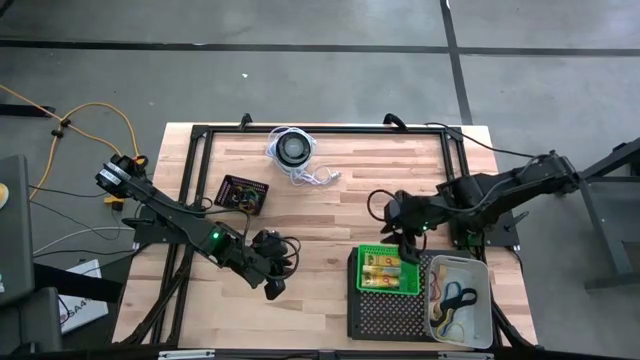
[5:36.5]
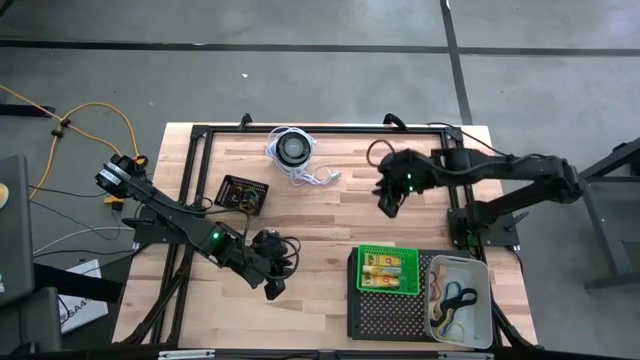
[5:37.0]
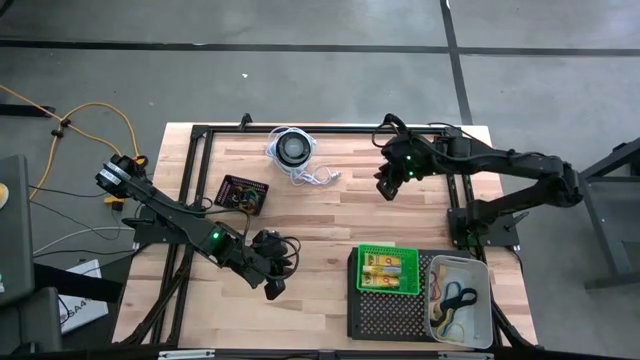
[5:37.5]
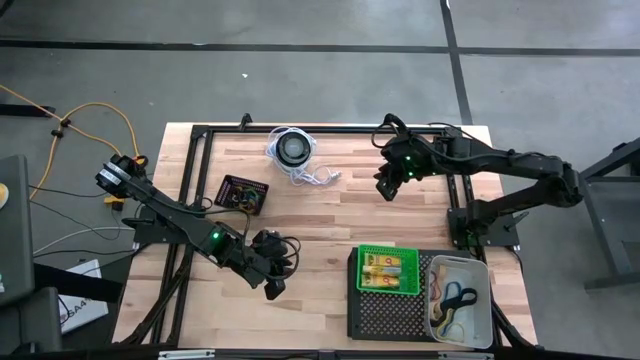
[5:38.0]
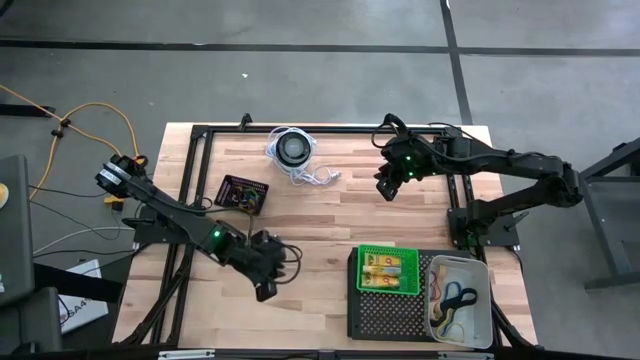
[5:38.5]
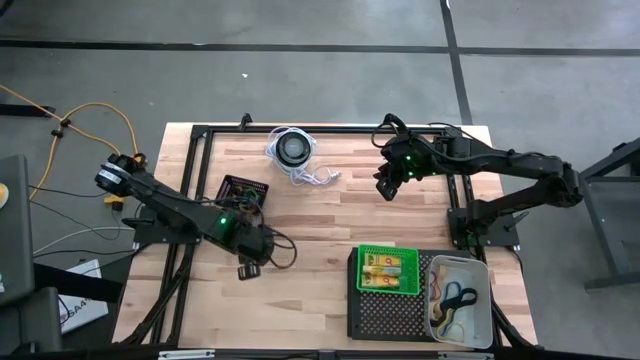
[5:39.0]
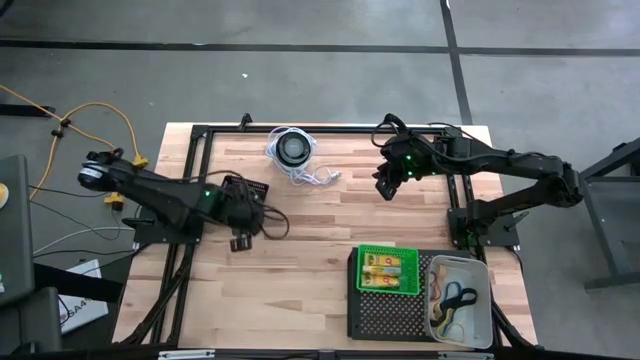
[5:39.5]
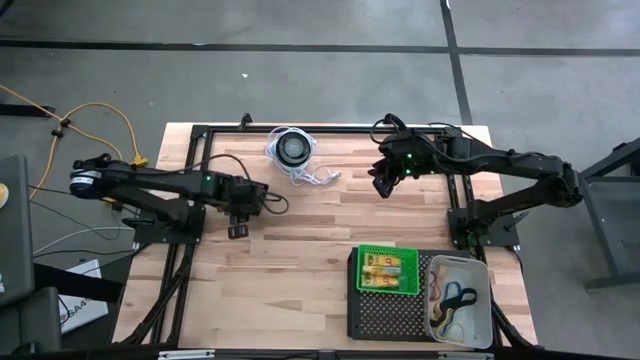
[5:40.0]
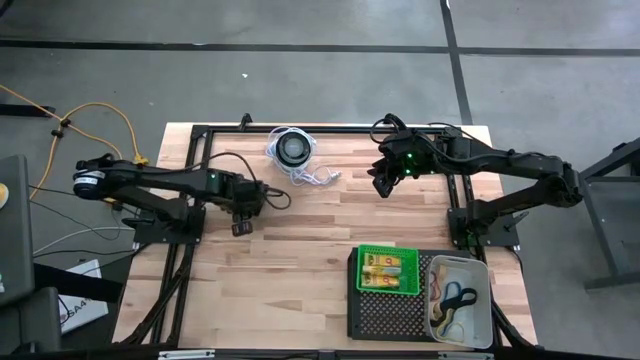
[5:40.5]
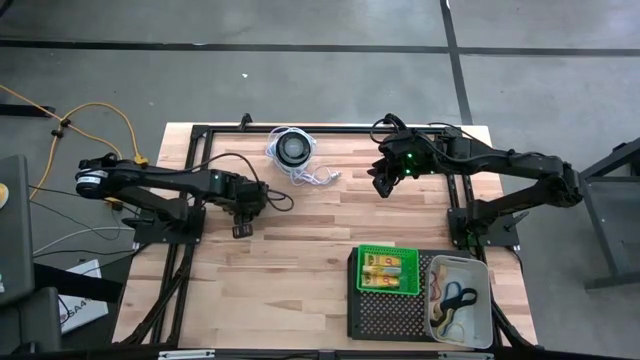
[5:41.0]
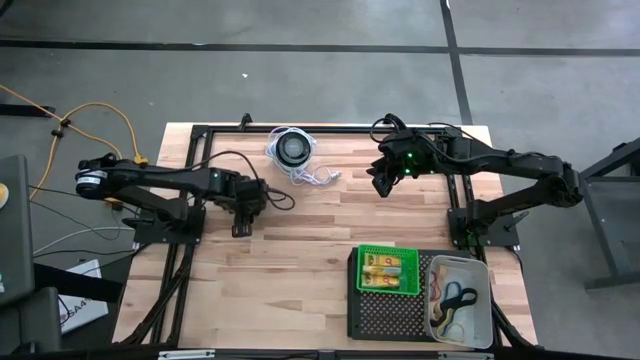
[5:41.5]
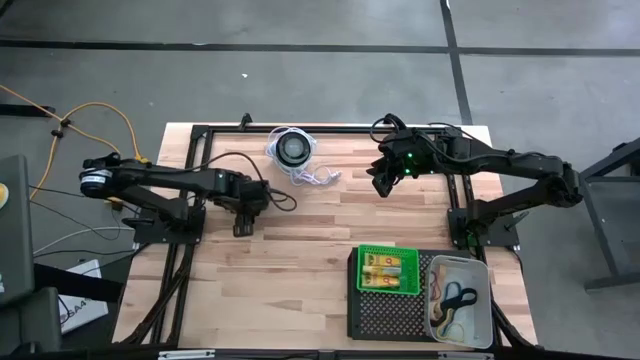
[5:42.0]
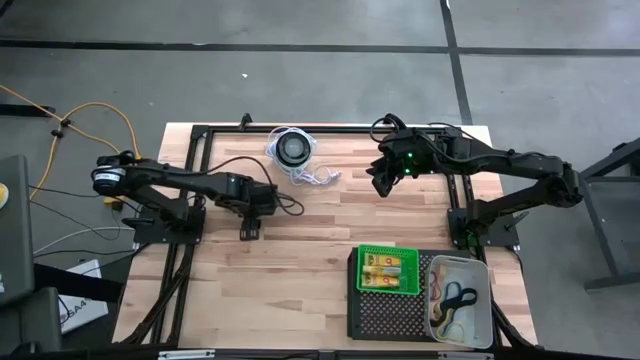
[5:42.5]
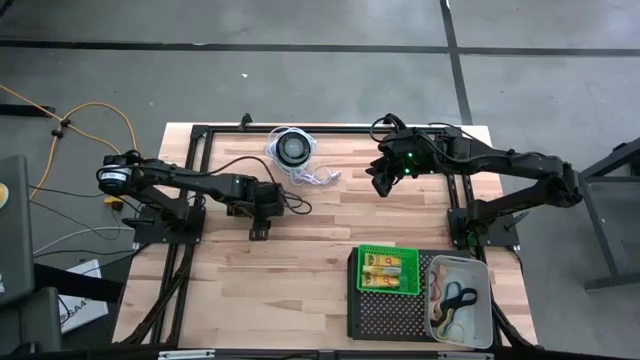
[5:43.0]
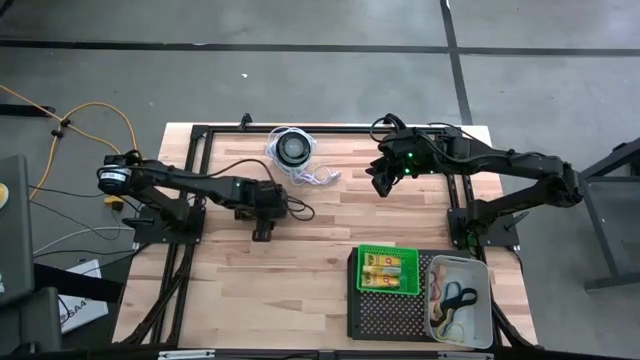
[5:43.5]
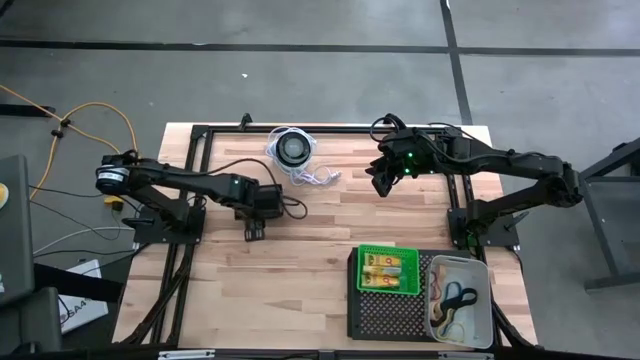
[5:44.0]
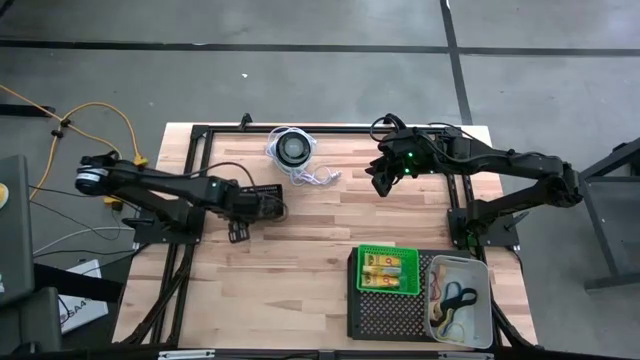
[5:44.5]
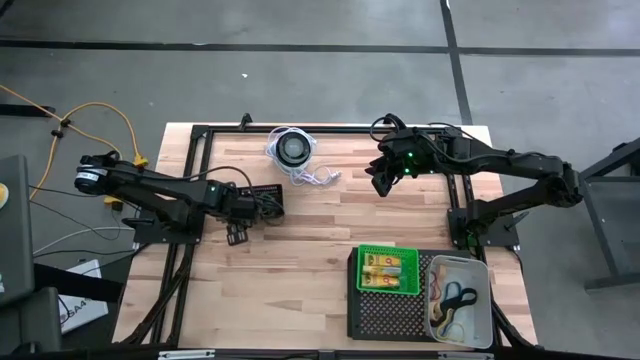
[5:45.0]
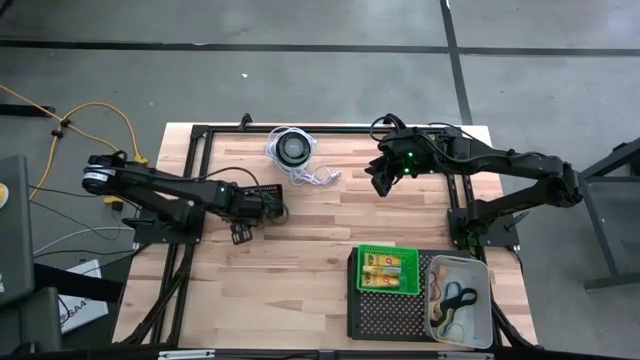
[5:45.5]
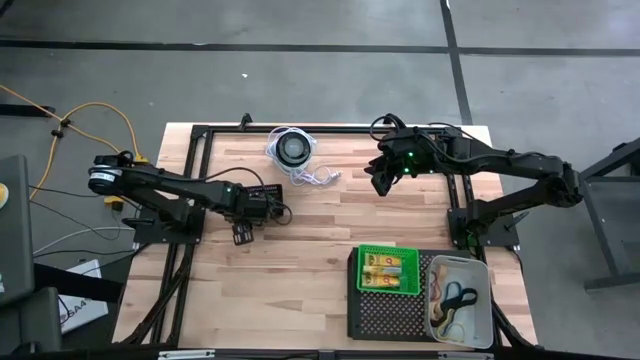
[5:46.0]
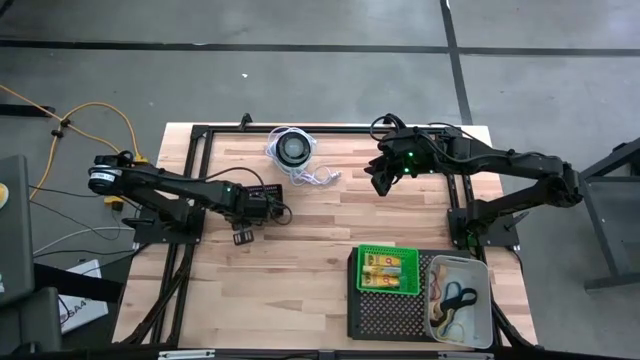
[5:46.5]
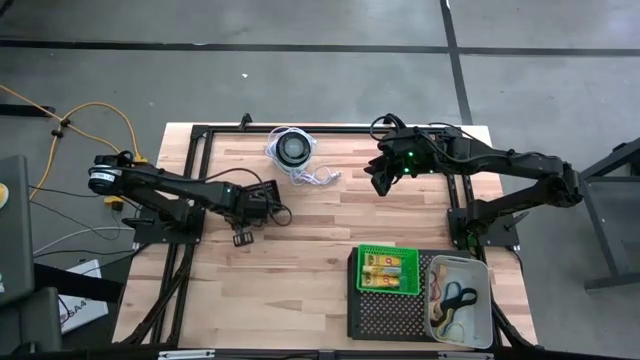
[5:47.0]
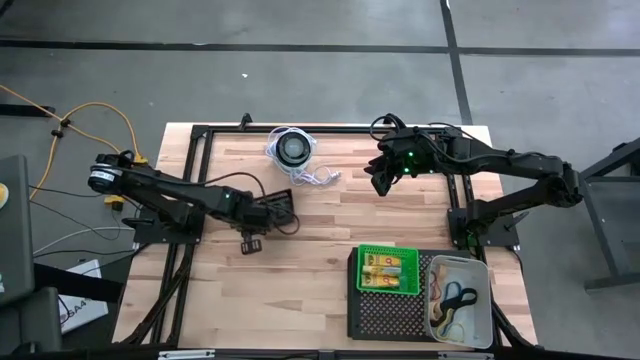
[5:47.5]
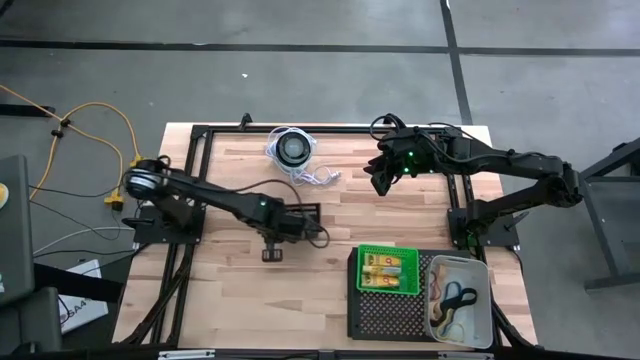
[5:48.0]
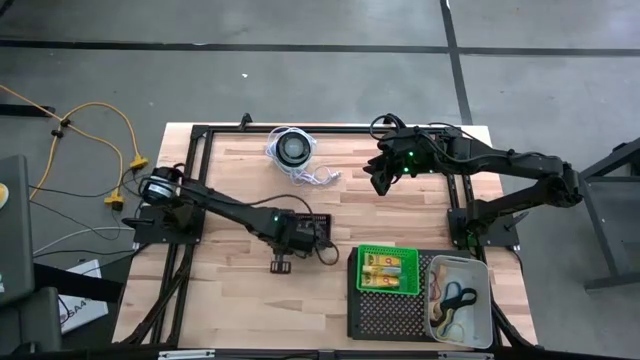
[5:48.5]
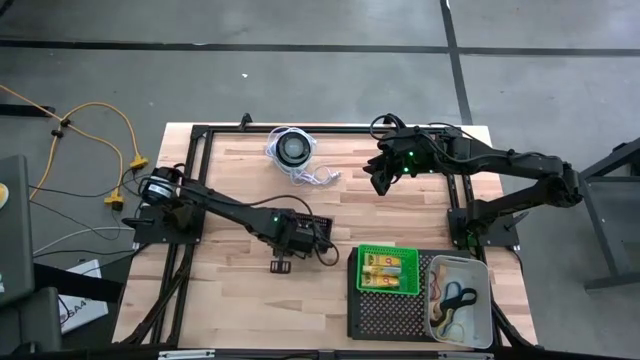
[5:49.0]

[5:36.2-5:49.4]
Task: Pick & Place Office Desk Supplies
Move the black bin to the center of the table

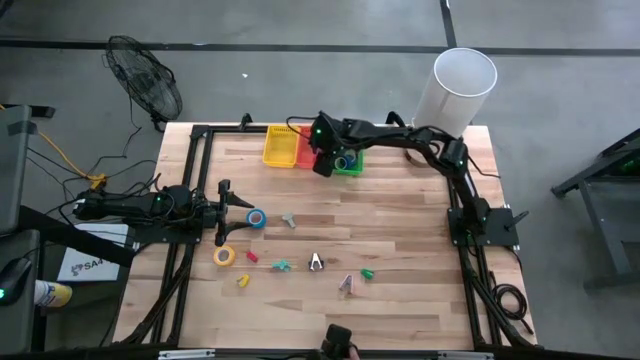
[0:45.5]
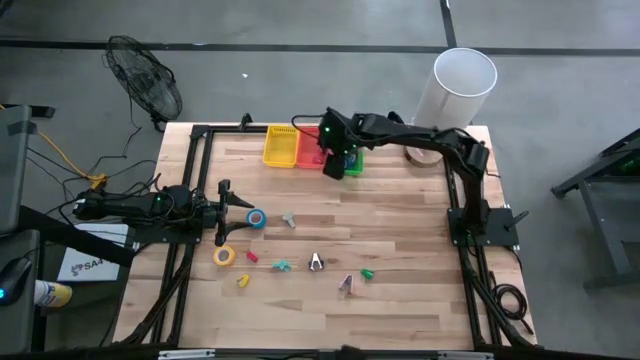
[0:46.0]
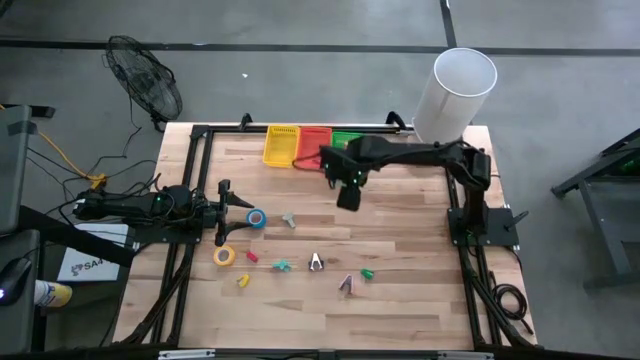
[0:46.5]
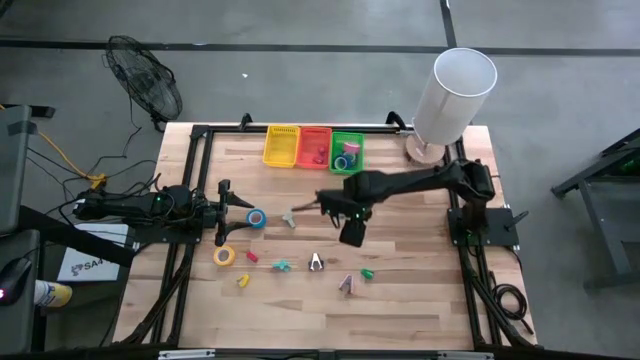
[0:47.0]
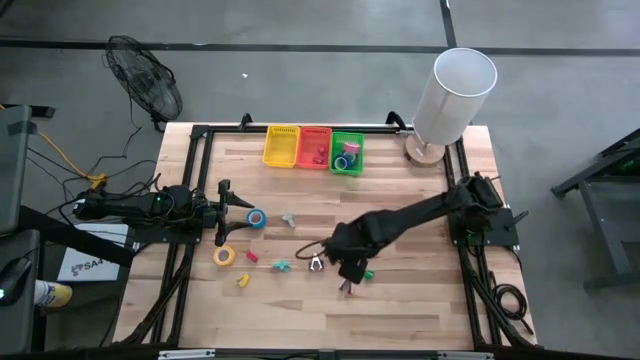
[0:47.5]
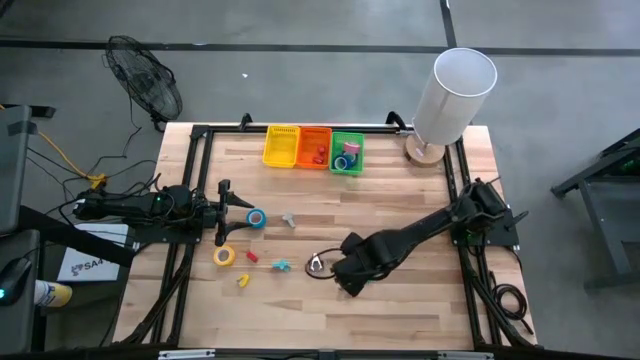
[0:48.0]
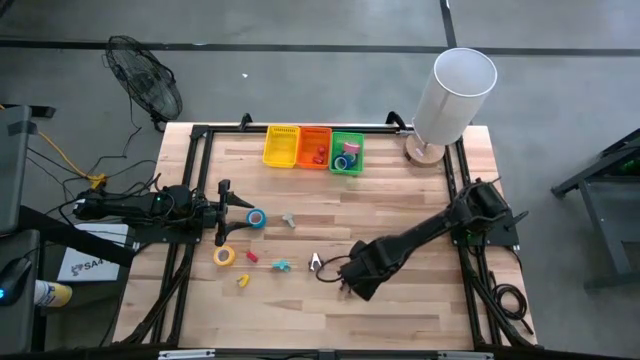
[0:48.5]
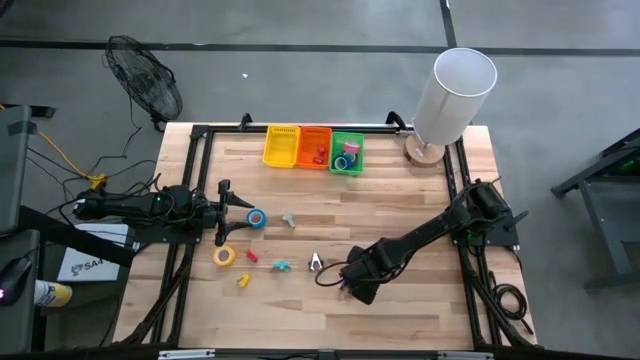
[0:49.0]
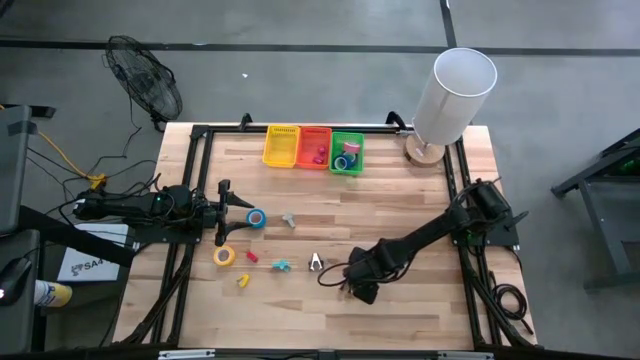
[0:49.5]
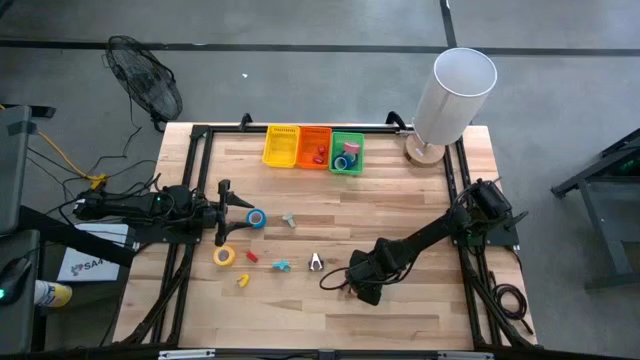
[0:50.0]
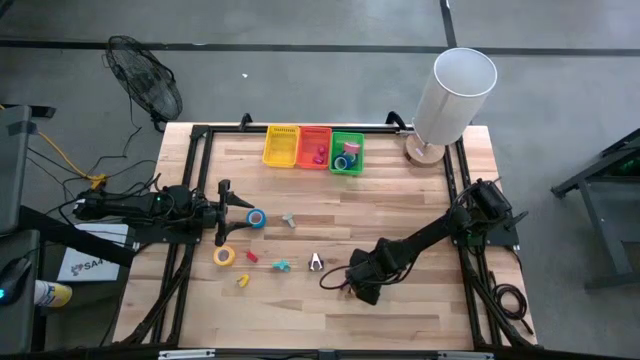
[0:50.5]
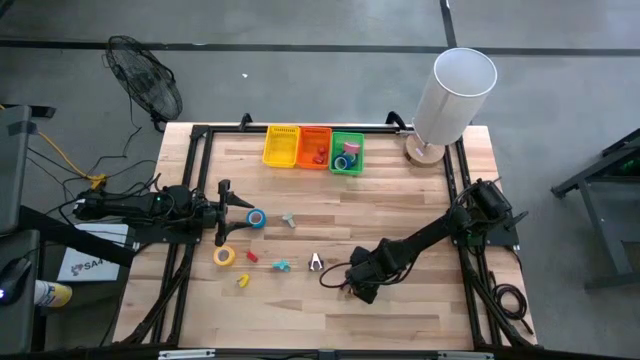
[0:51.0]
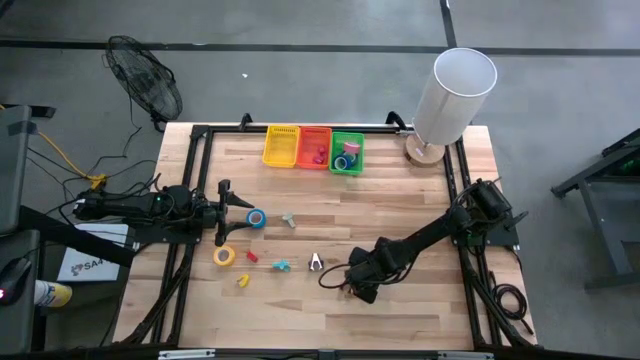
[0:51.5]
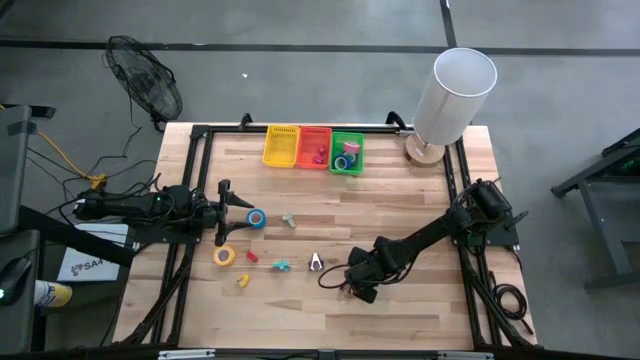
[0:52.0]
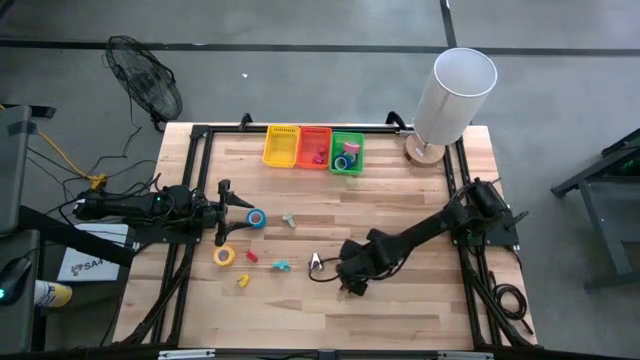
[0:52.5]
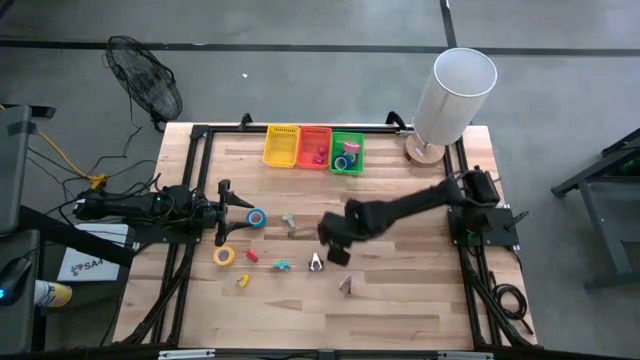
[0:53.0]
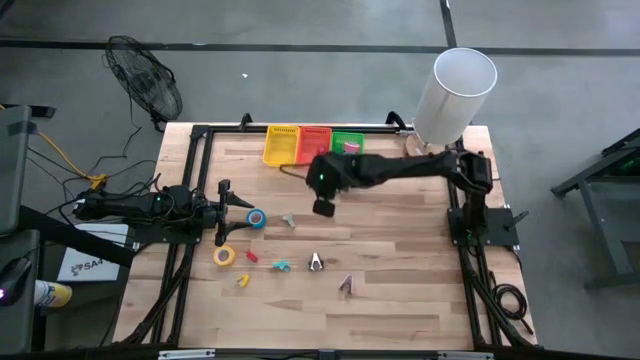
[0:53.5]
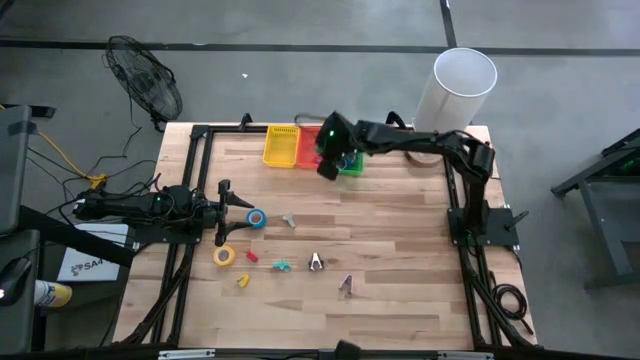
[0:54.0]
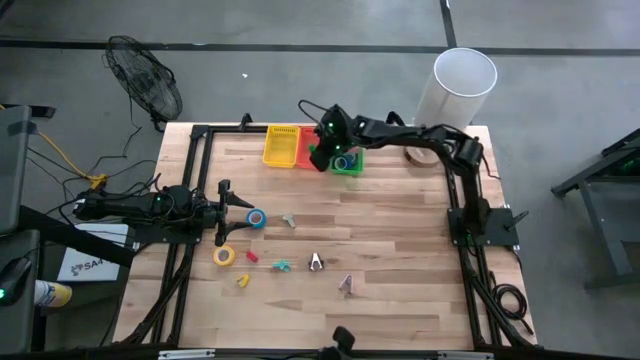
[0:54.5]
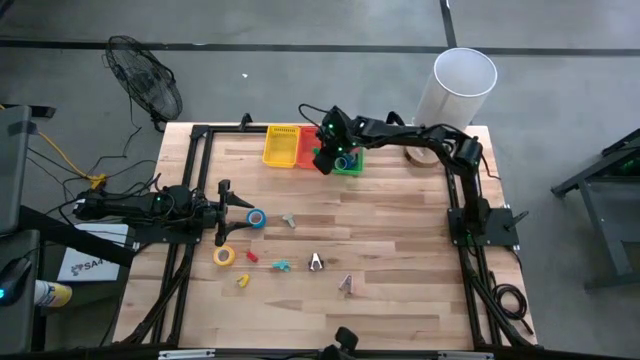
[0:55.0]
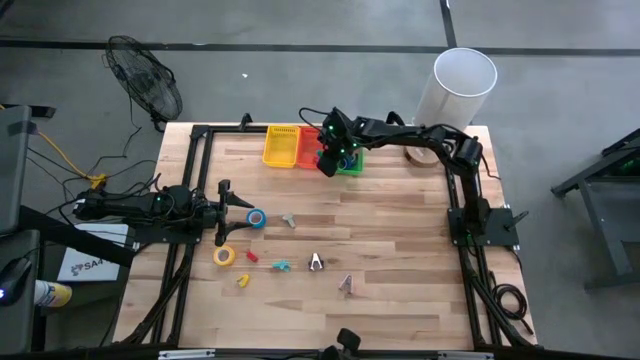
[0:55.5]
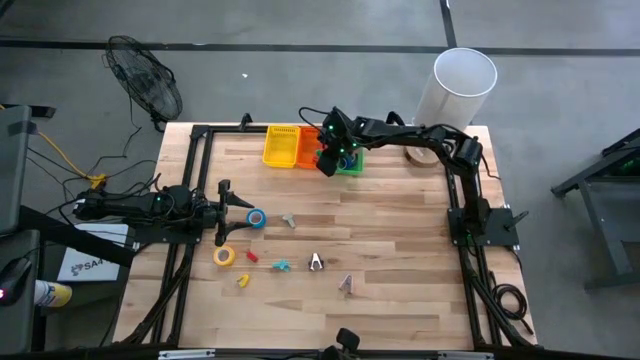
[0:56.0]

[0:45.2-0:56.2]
Task: Pick and place Stapler, Stapler remover, tape
Put the green stapler into the orange basket
